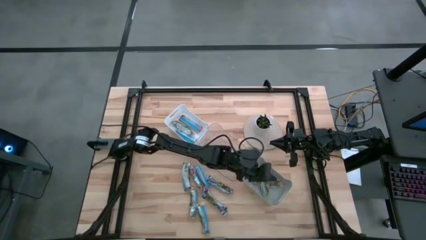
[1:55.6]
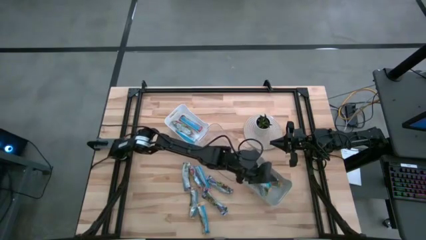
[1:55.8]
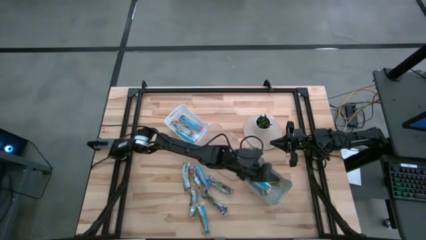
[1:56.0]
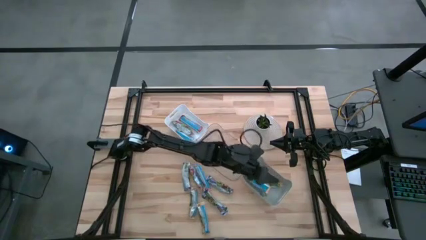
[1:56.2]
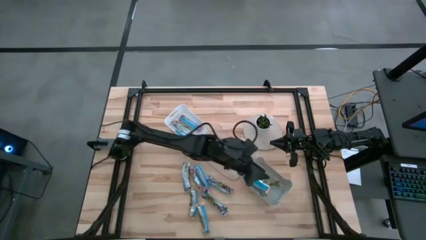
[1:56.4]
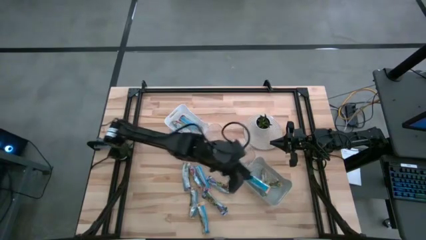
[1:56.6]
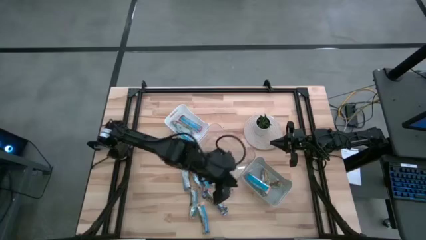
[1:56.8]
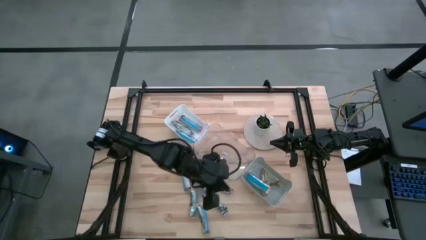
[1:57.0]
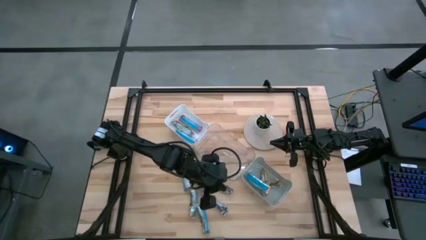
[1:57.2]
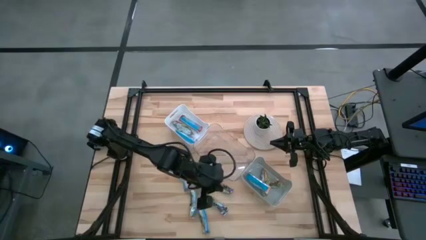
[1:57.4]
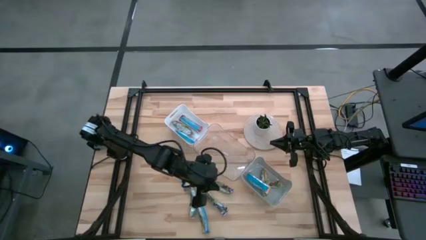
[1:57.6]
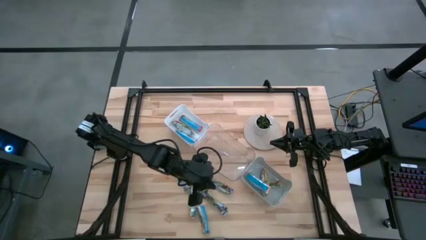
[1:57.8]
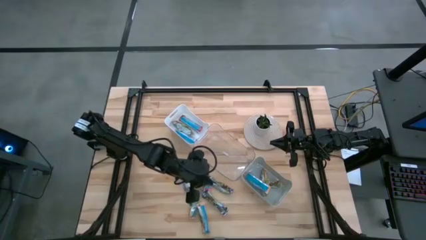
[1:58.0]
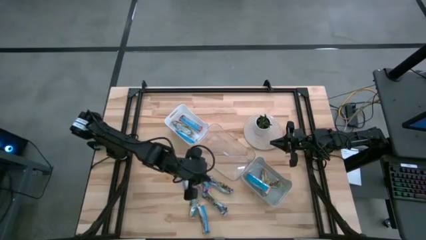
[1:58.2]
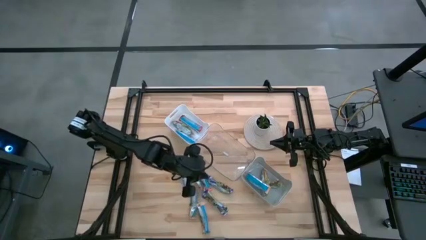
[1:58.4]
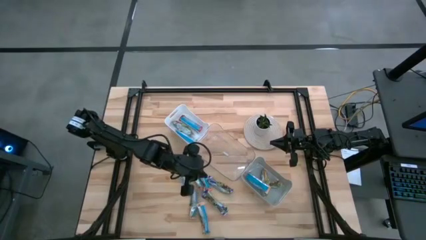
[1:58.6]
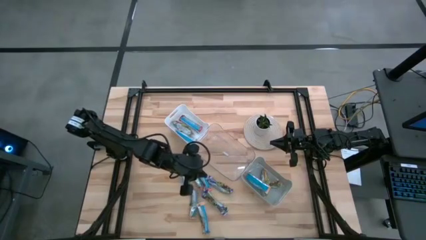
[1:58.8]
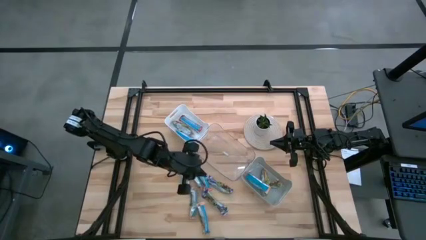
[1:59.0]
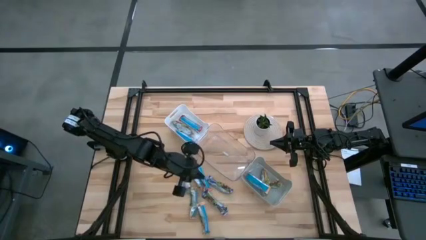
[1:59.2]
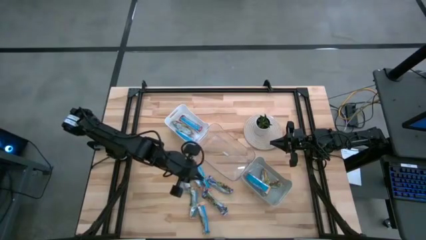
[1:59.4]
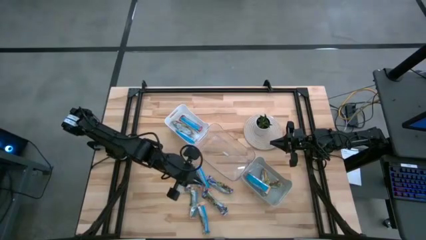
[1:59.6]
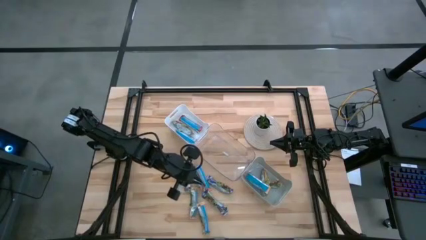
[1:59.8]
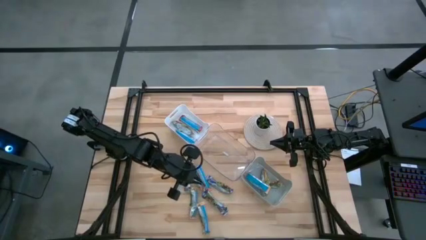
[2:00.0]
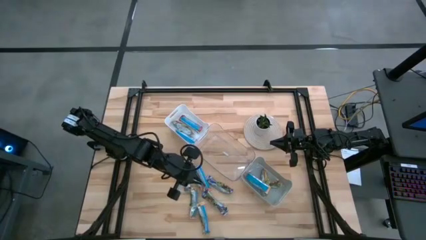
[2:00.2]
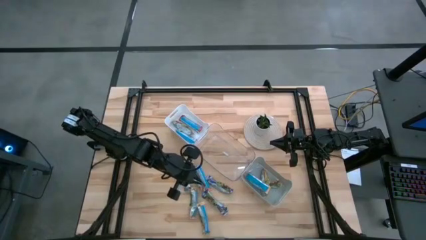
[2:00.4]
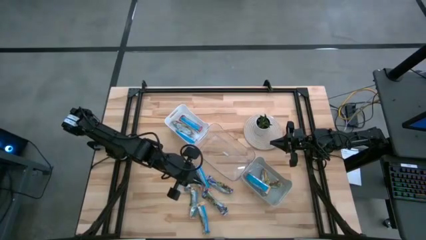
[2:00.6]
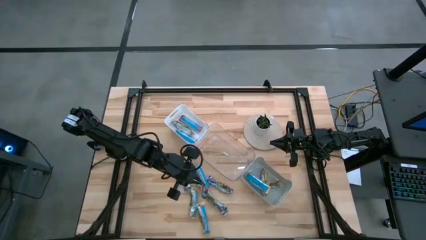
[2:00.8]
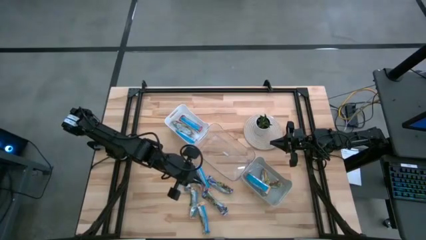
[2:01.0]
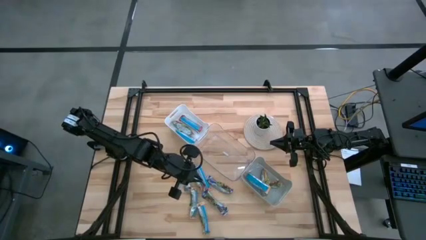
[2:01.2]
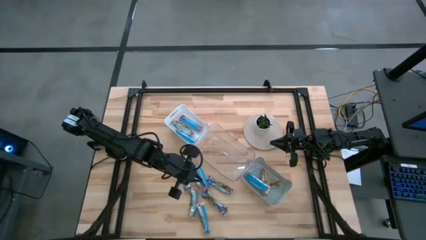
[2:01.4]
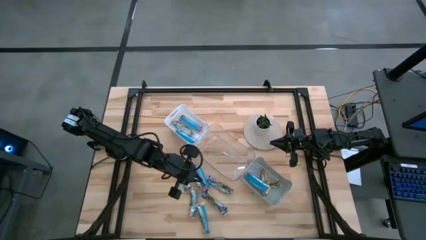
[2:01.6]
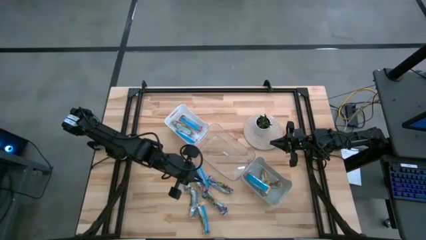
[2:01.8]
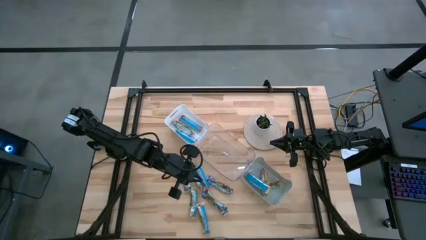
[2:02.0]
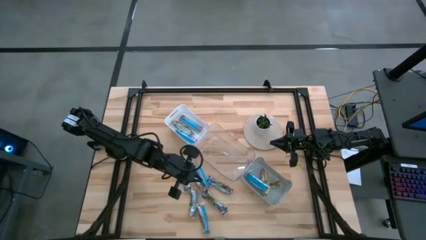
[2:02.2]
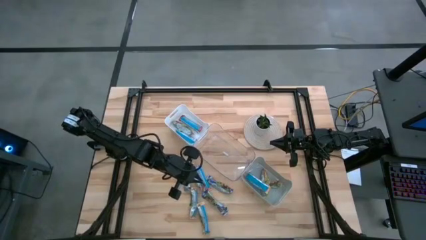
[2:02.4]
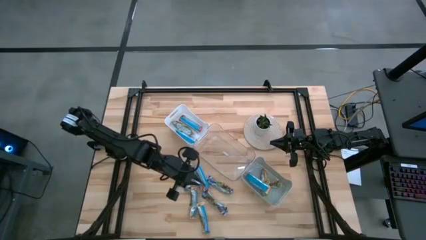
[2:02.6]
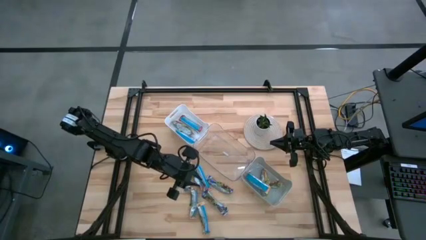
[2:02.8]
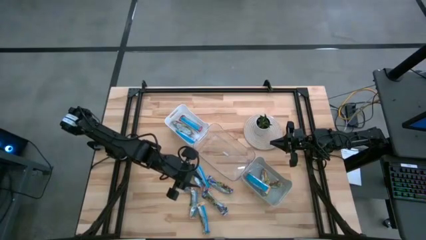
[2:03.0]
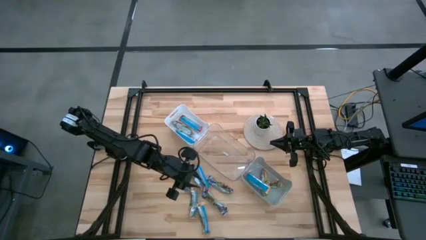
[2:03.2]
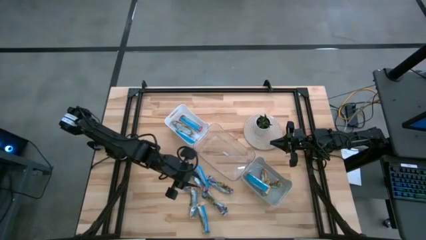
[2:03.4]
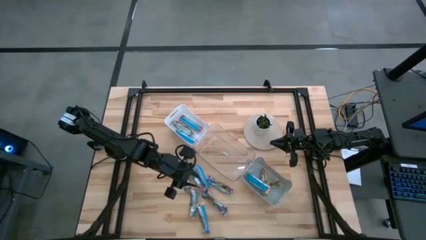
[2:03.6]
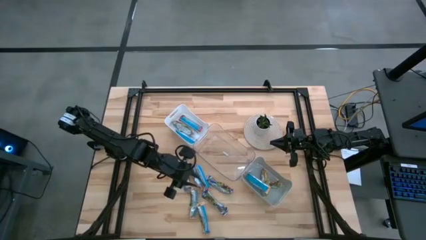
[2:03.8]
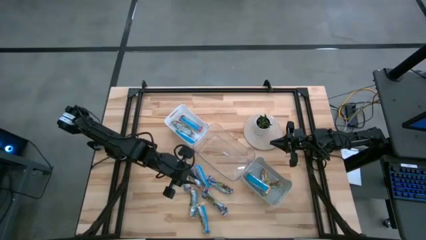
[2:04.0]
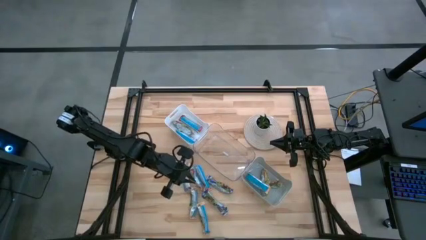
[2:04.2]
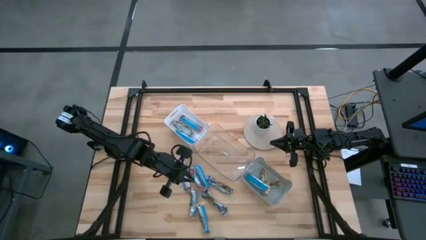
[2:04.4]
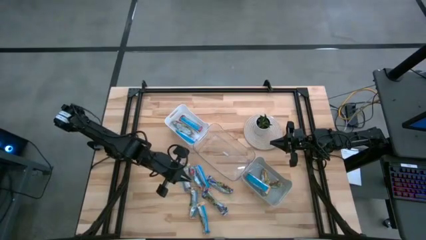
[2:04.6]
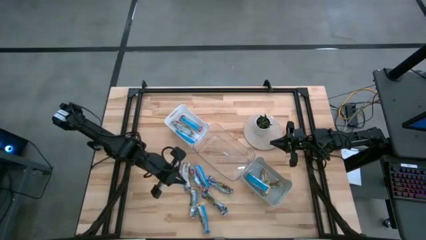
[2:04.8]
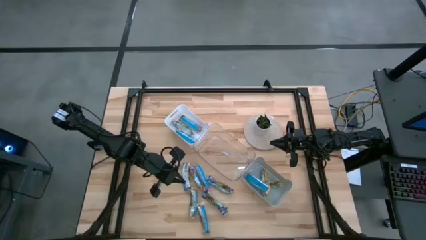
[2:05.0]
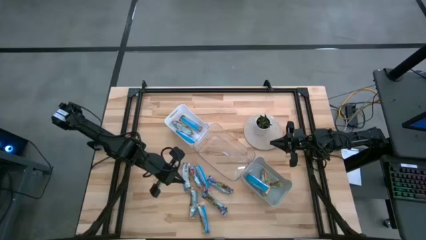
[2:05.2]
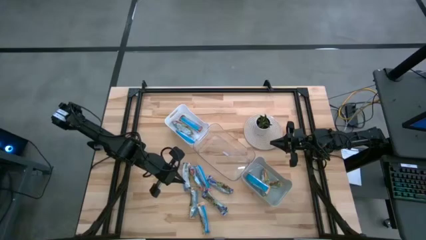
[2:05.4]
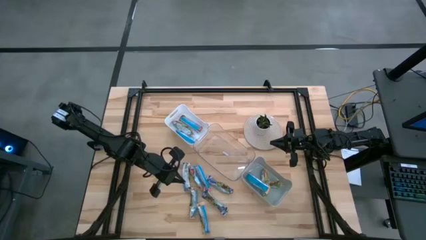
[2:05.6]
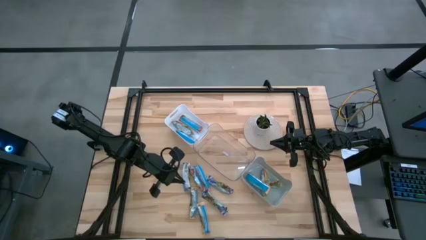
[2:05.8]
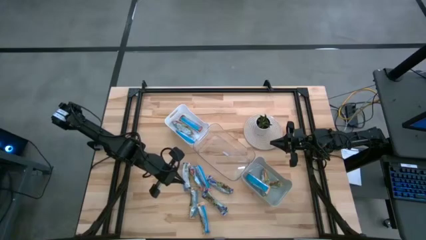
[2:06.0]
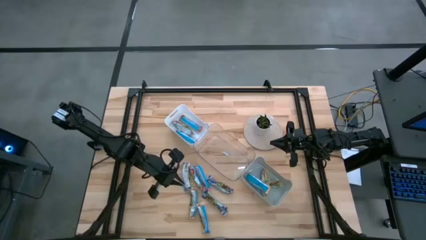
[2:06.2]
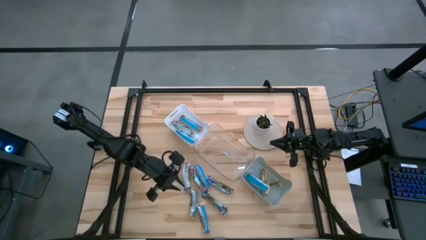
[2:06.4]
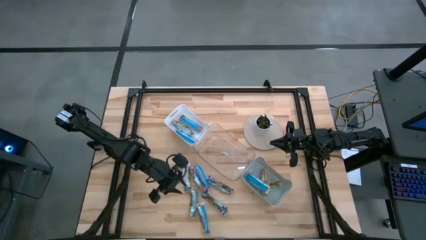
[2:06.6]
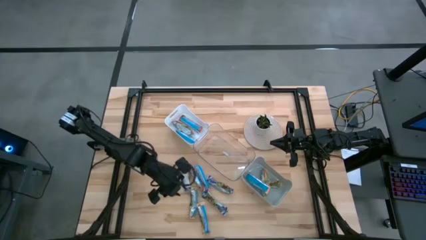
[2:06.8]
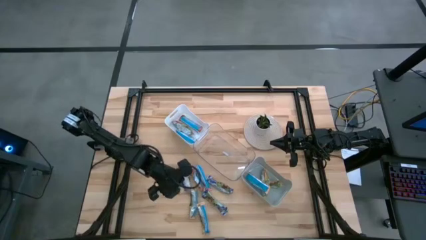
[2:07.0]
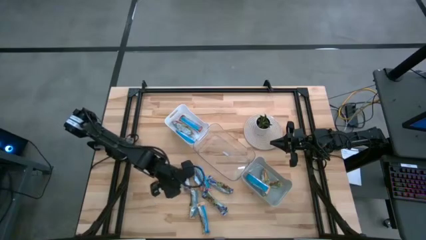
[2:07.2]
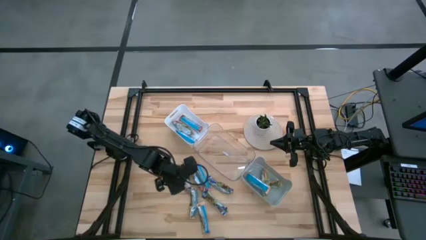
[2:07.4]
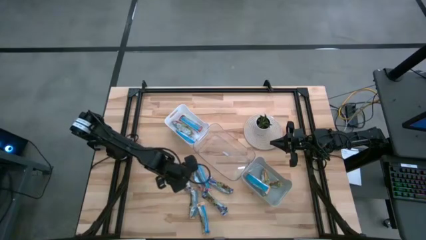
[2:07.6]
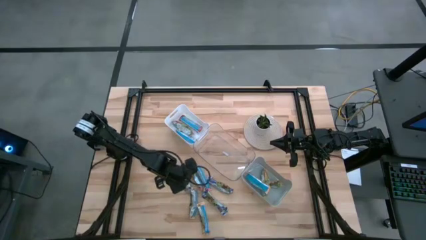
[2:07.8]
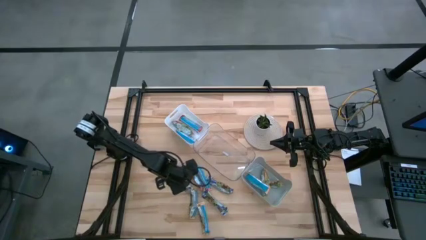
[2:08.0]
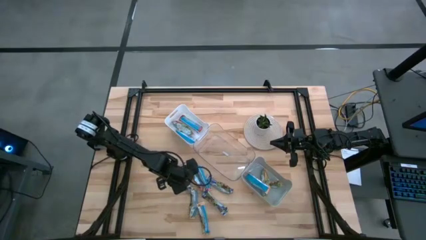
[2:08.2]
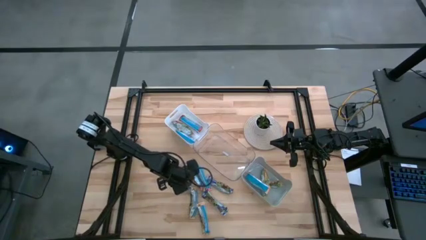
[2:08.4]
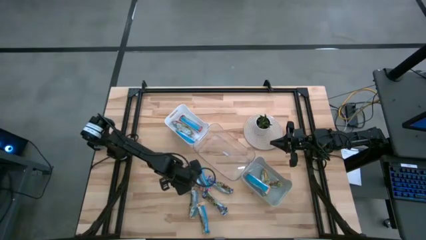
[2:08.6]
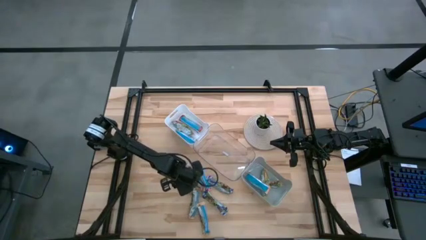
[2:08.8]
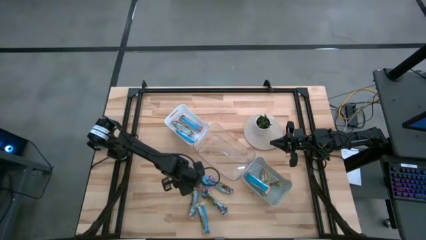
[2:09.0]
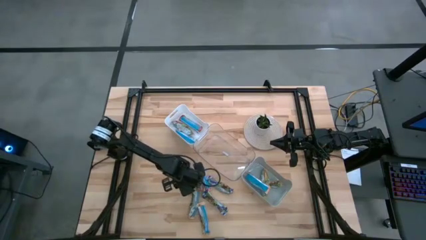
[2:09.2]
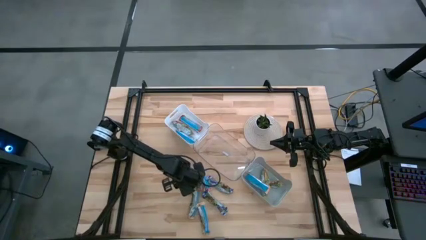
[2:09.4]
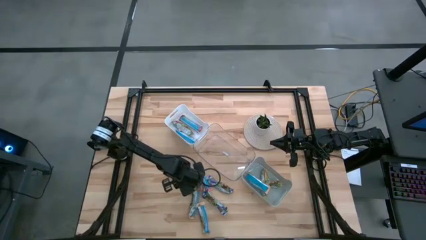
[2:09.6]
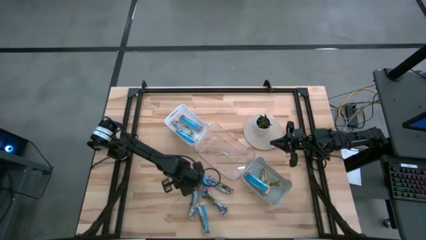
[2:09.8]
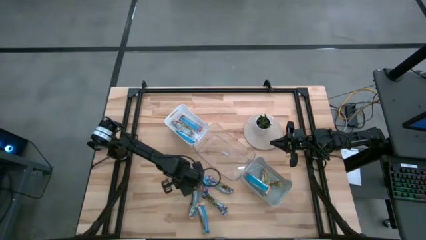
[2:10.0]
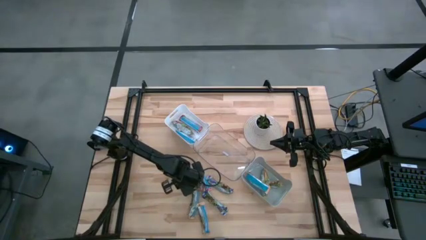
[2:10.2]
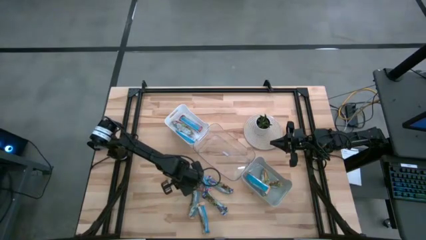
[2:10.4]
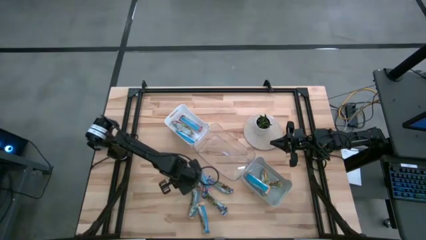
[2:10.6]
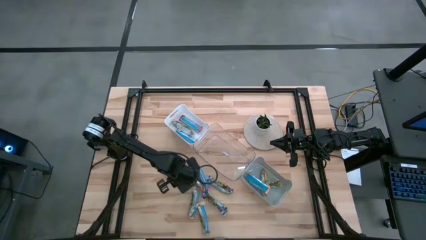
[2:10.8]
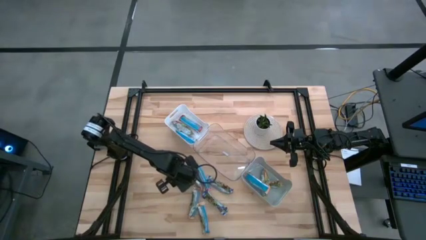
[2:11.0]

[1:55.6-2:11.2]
Task: Pick and place Granola Bars by type
Put the blue granola bar into the transparent bin
